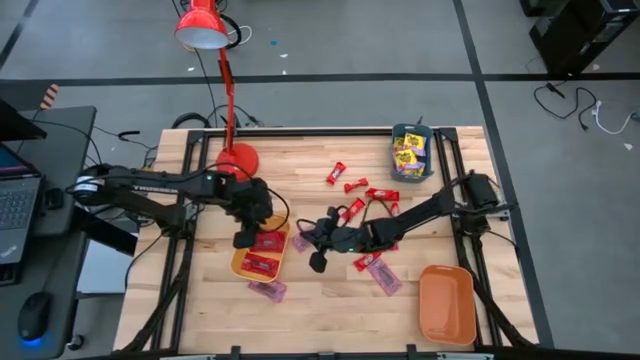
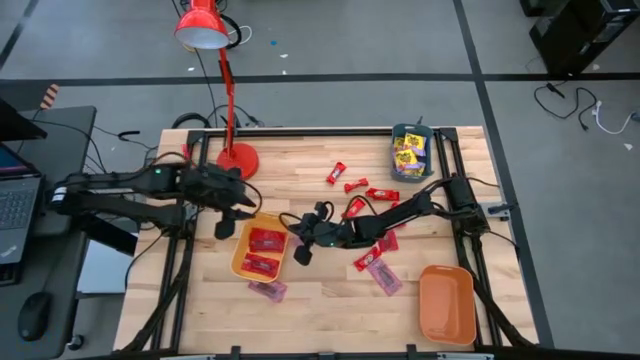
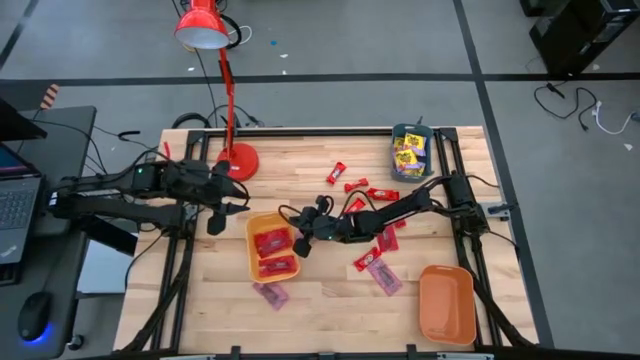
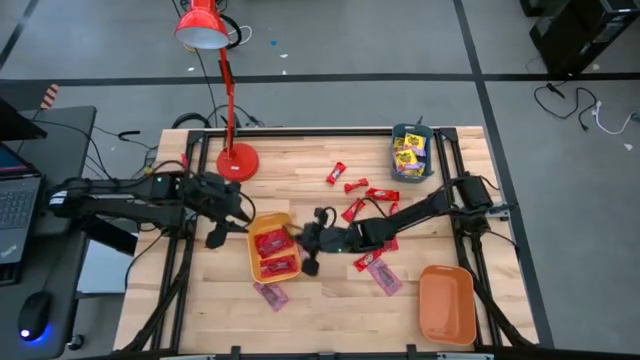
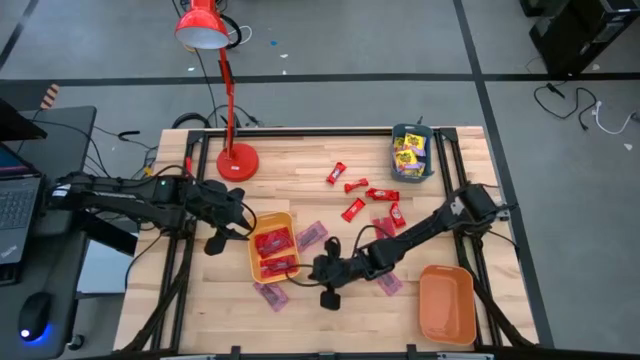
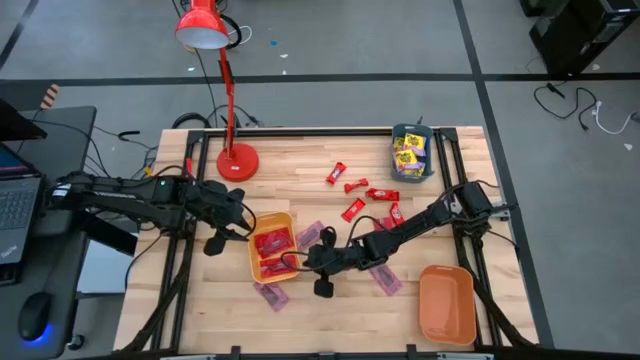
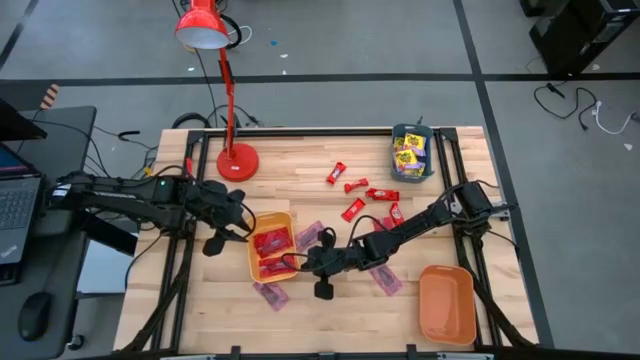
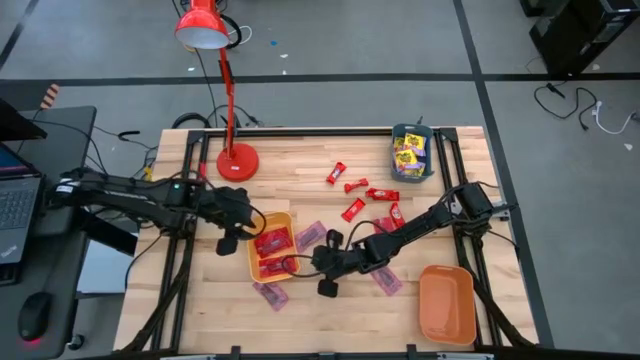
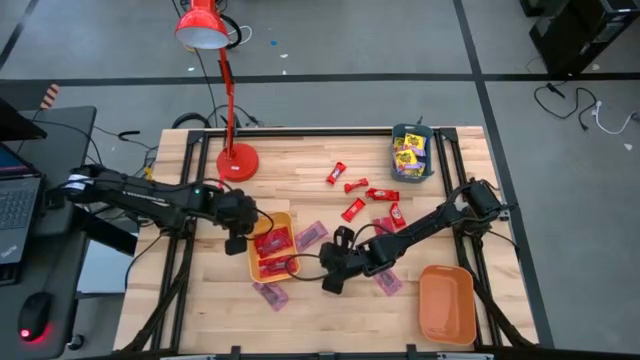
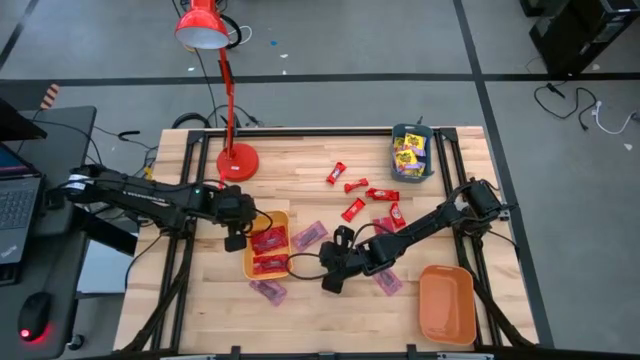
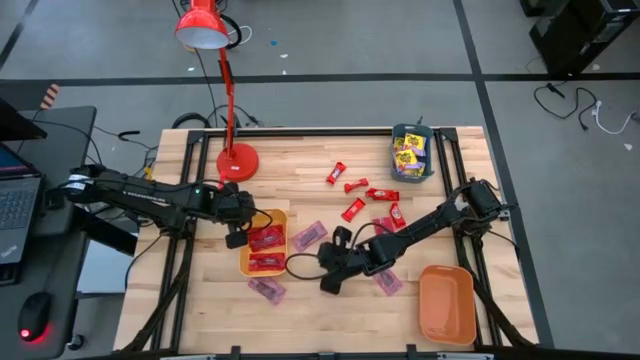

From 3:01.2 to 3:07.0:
Task: Sort candy
Adjust the yellow bin

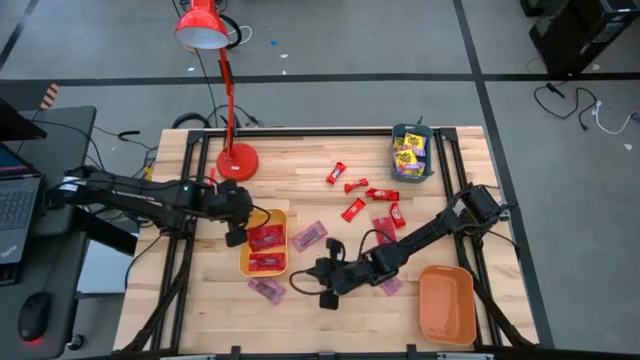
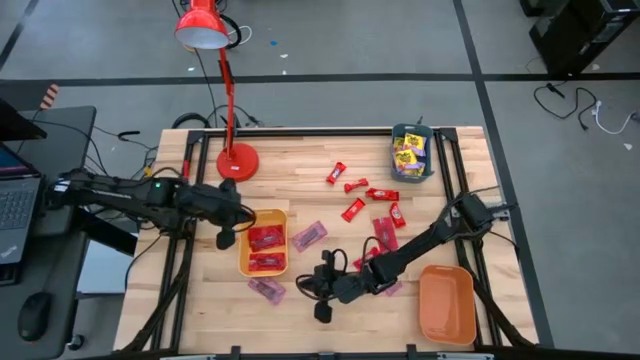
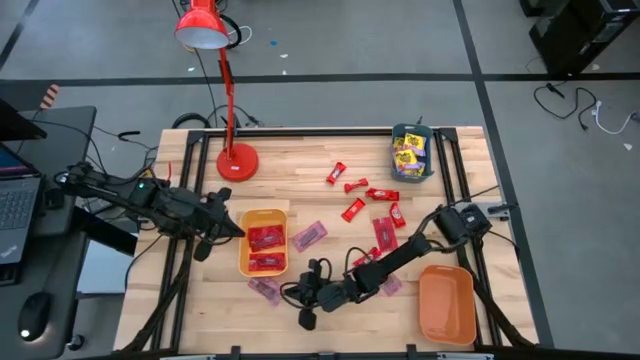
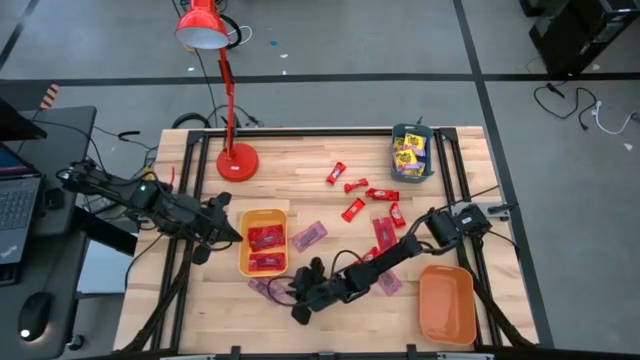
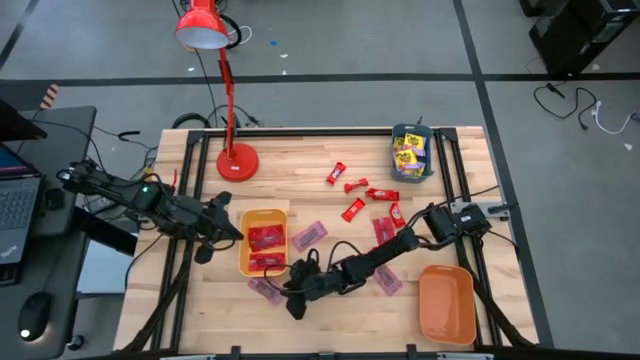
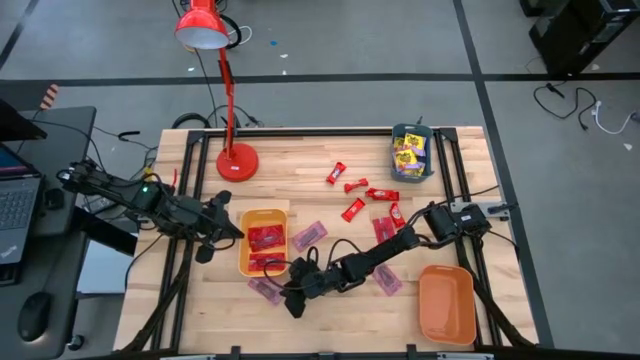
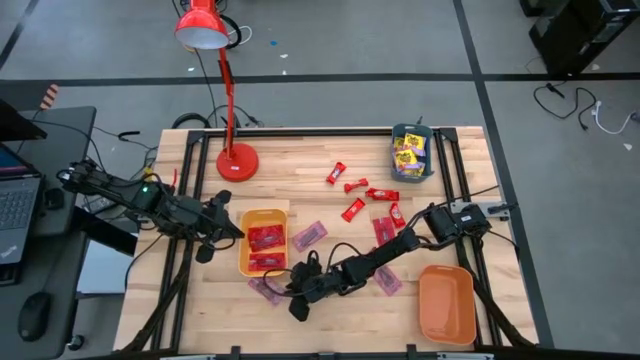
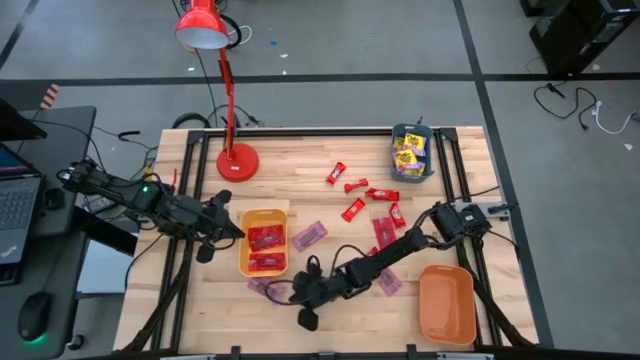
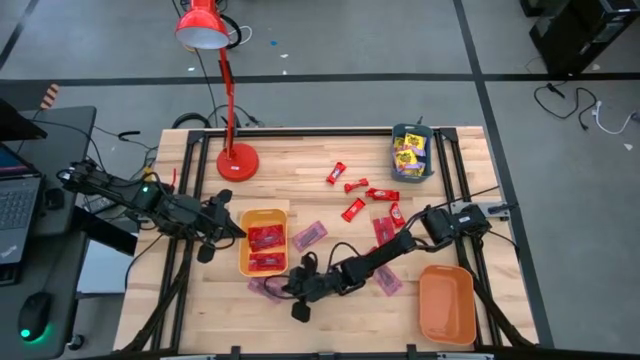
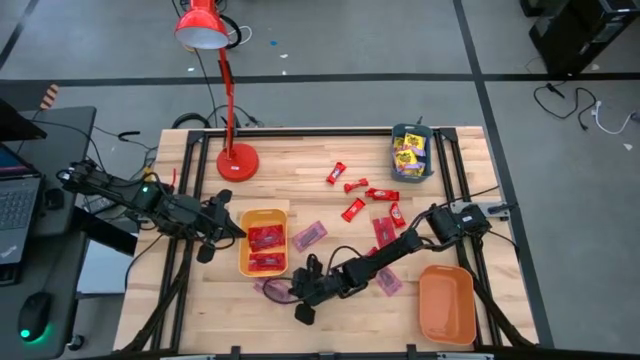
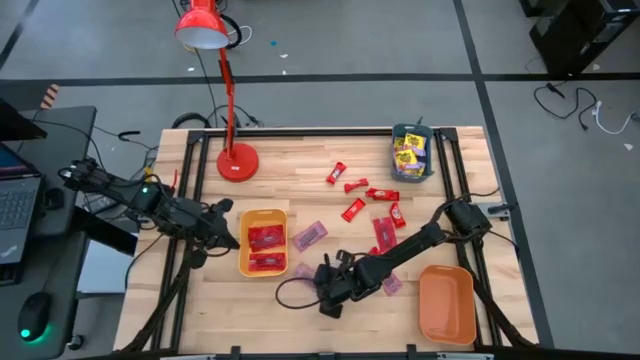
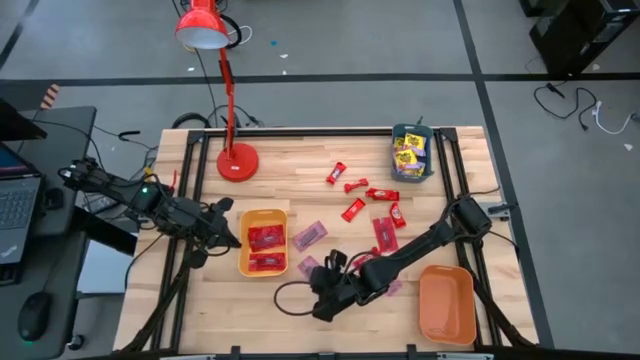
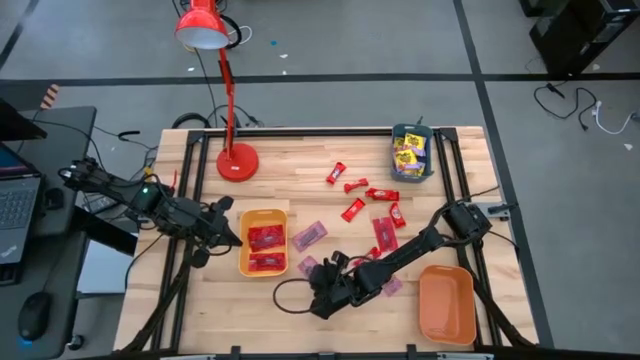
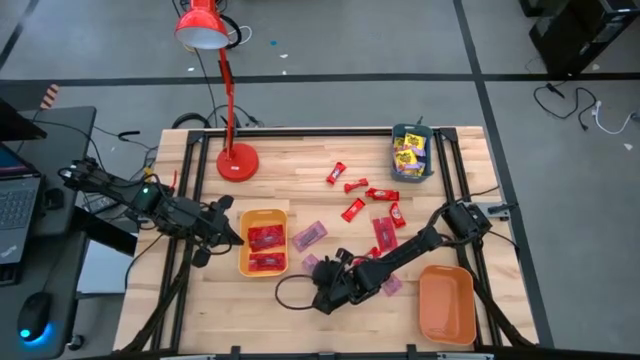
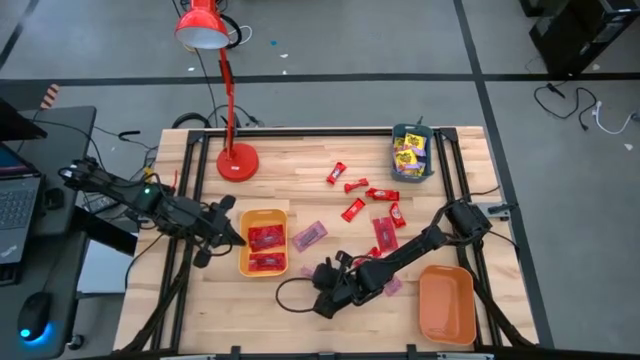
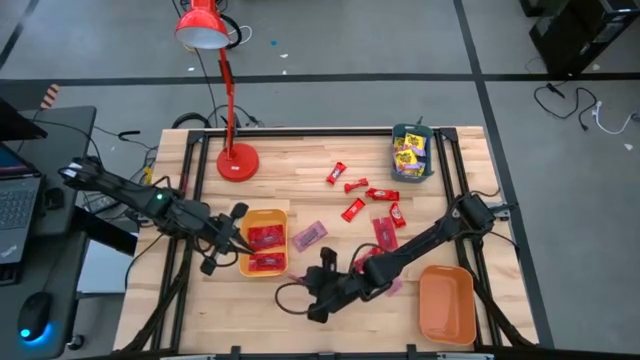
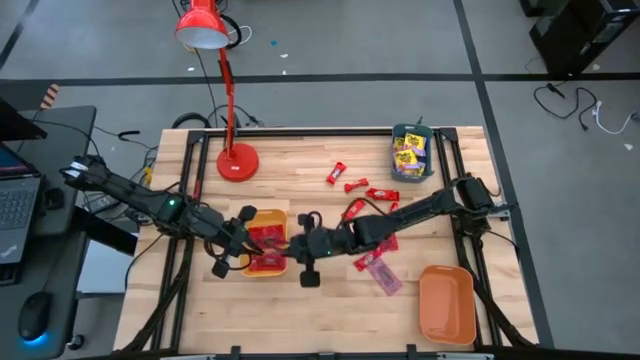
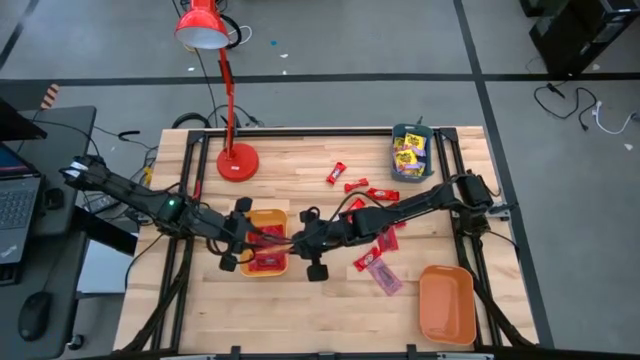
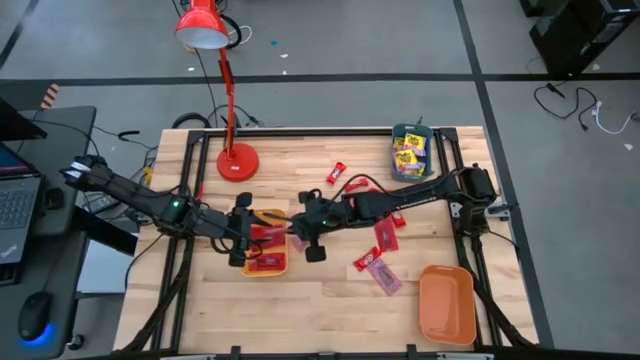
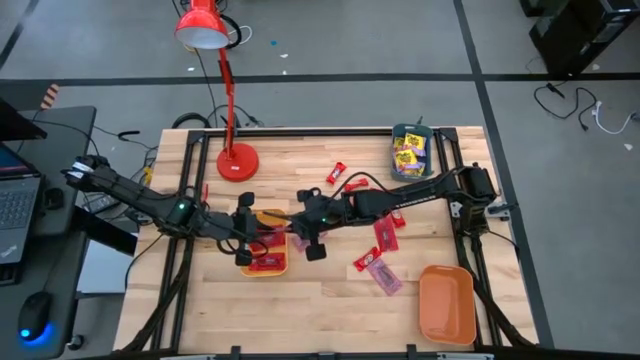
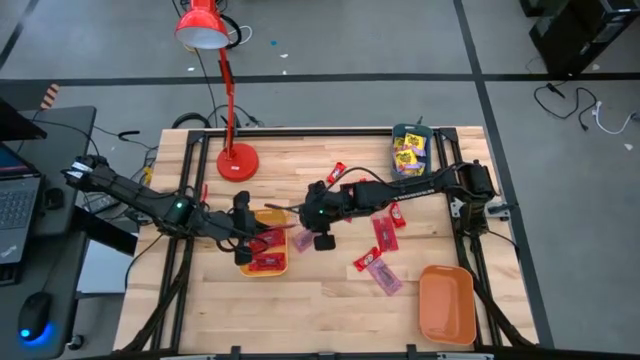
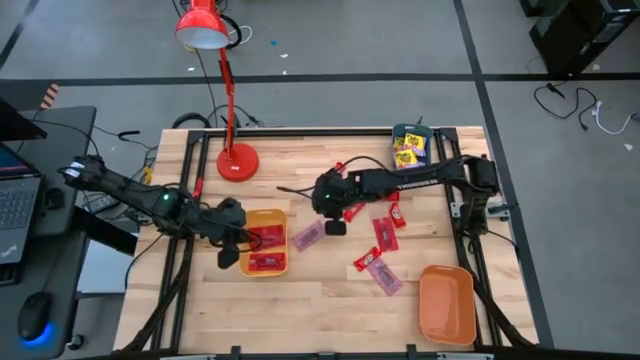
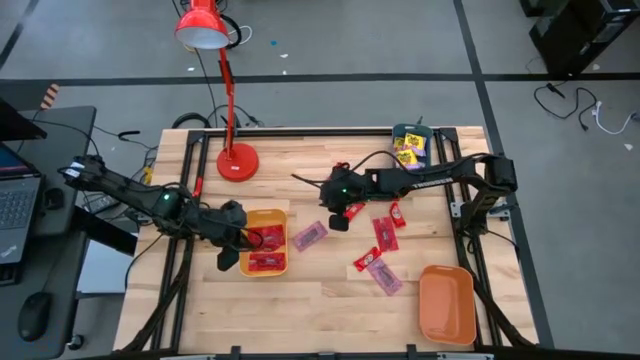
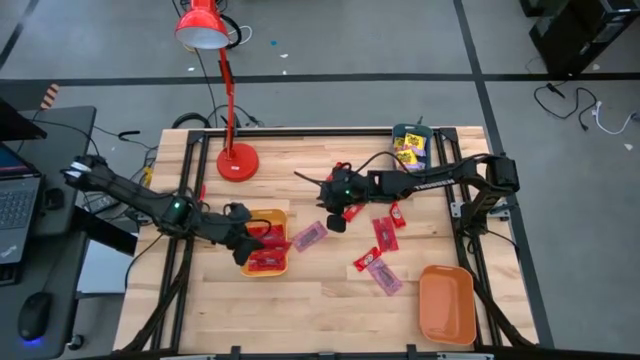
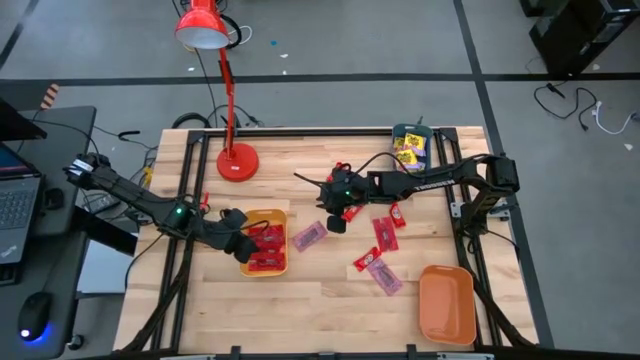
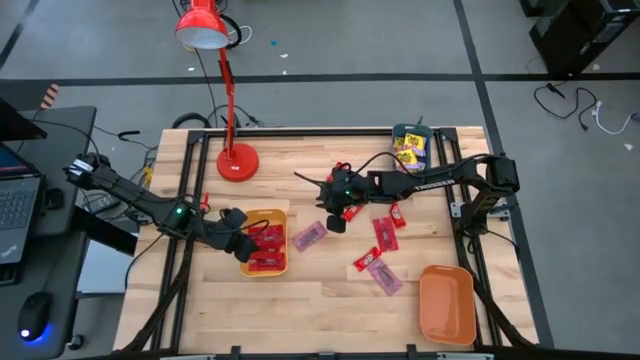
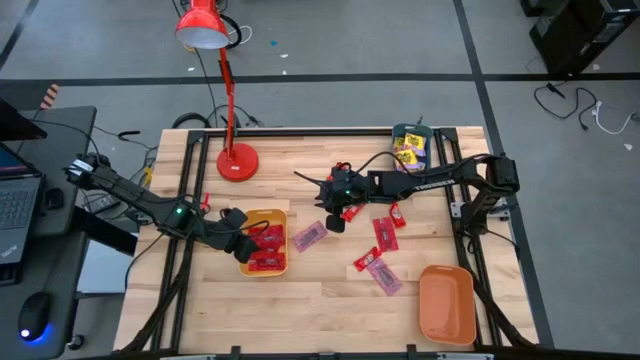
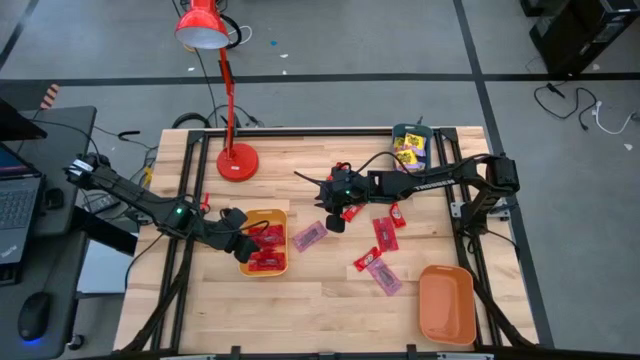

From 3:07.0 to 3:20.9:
Put the red candy pack into the yellow bin

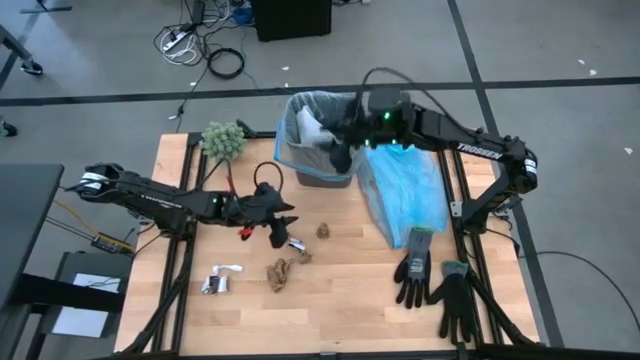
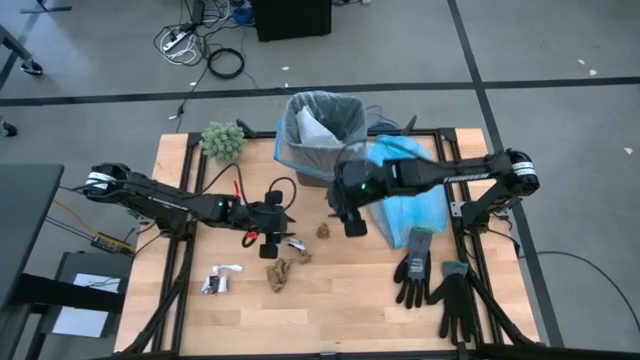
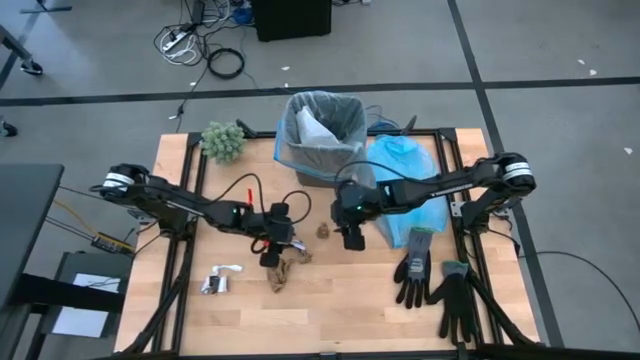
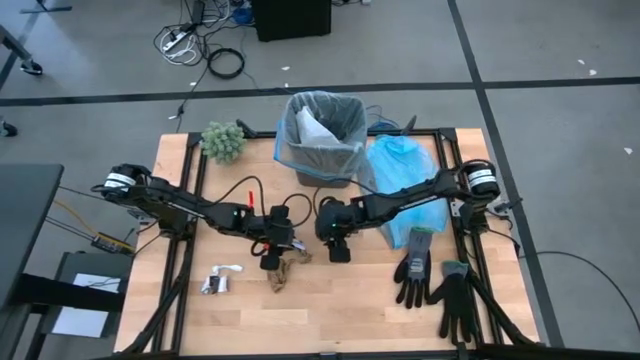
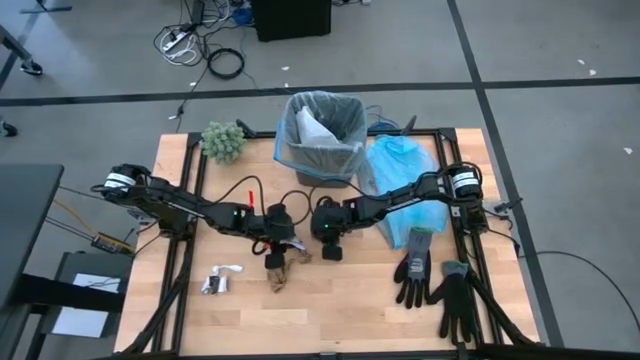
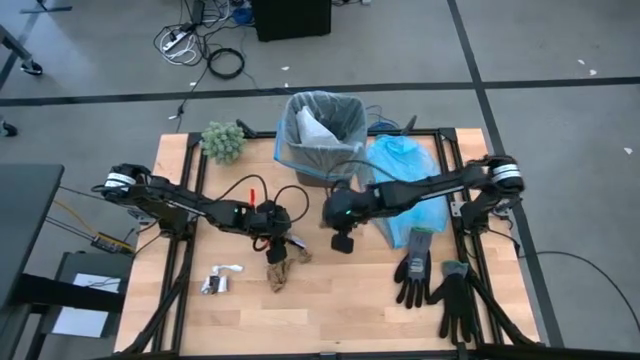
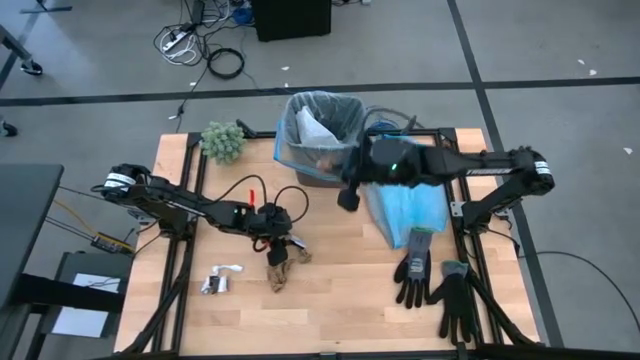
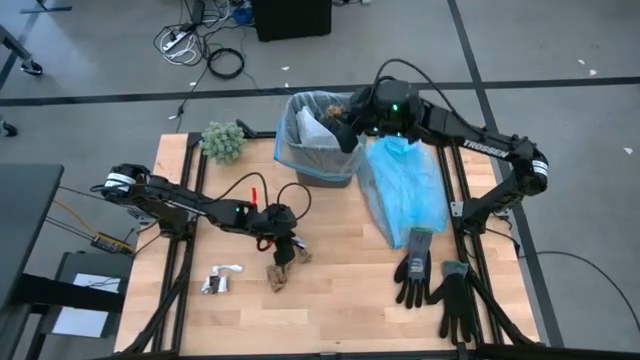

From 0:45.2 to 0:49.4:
Task: place trash/remove bag and relplace
Put the brown napkin into the trash bin
